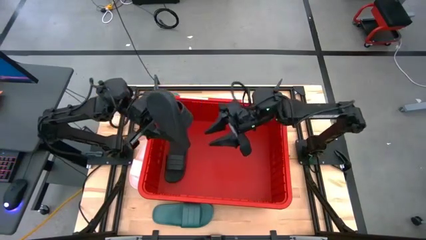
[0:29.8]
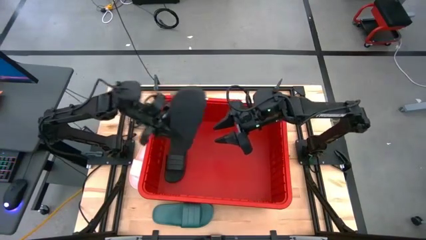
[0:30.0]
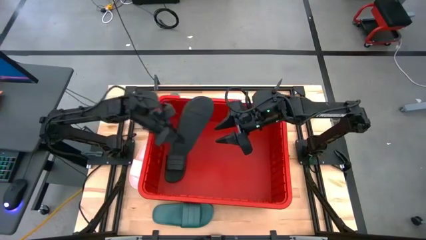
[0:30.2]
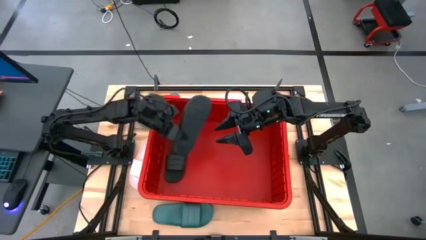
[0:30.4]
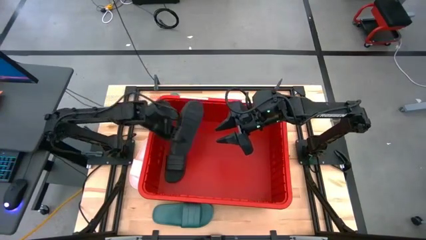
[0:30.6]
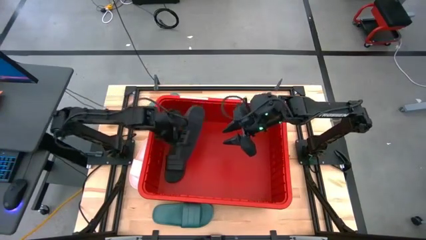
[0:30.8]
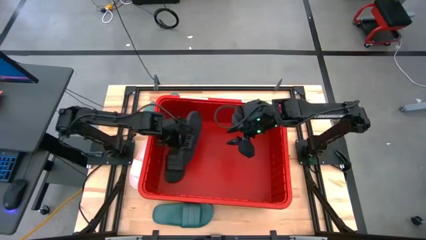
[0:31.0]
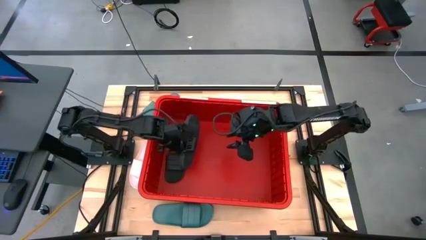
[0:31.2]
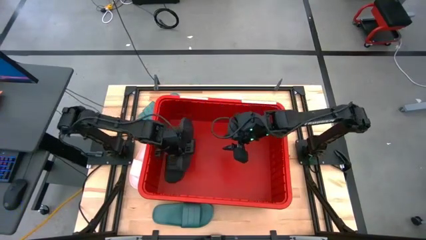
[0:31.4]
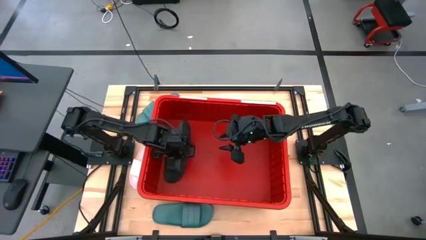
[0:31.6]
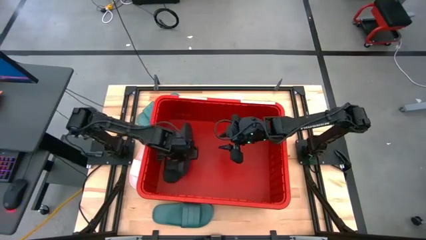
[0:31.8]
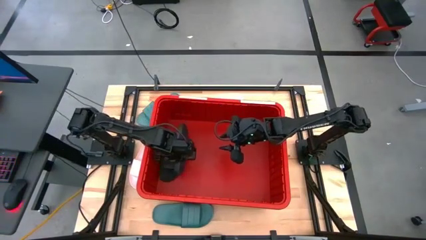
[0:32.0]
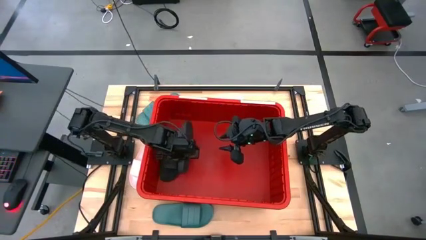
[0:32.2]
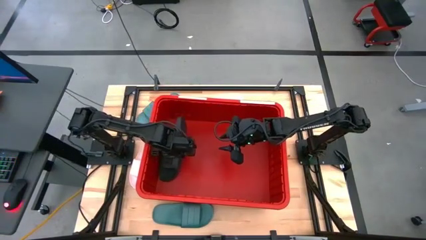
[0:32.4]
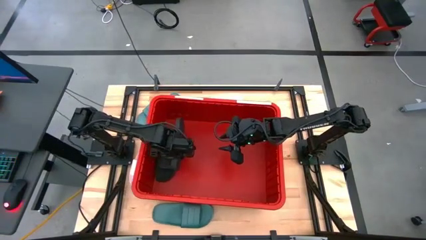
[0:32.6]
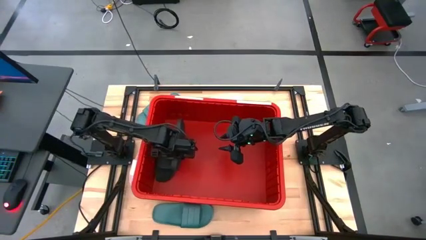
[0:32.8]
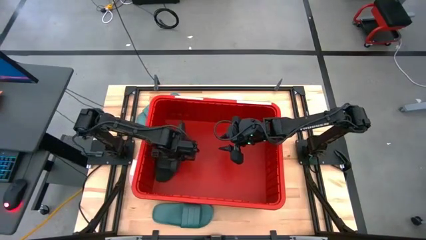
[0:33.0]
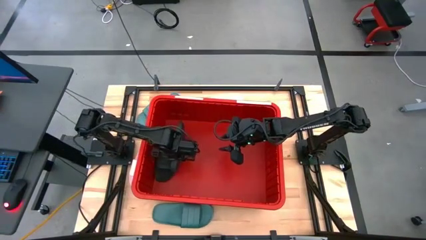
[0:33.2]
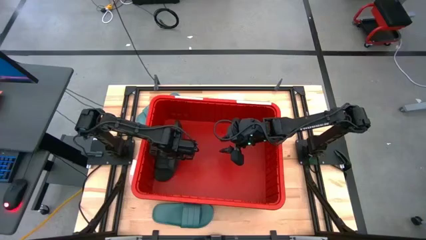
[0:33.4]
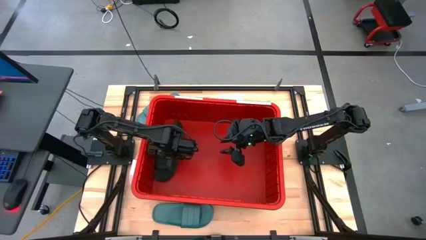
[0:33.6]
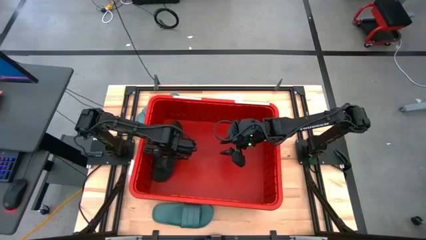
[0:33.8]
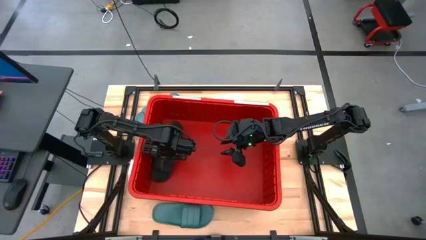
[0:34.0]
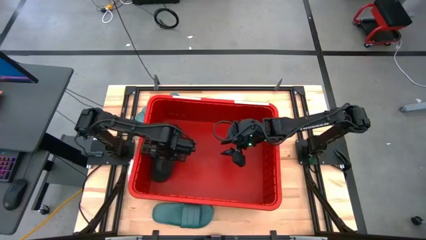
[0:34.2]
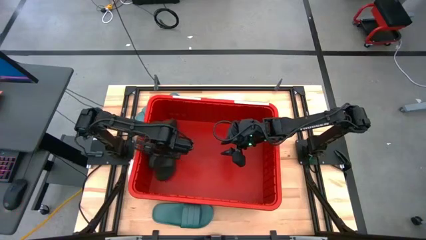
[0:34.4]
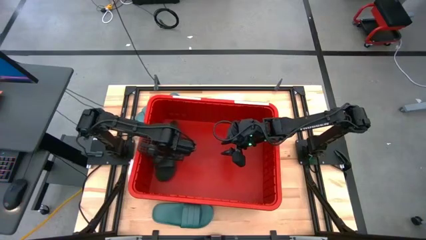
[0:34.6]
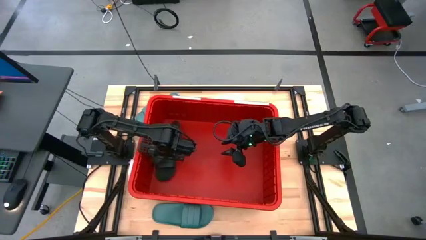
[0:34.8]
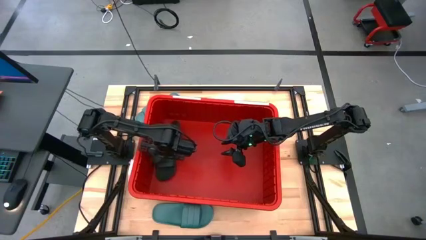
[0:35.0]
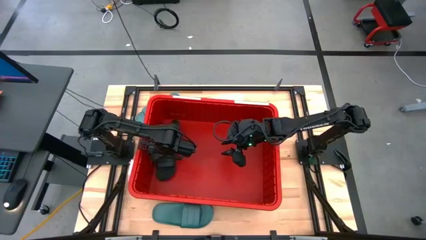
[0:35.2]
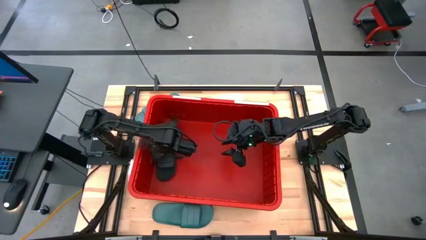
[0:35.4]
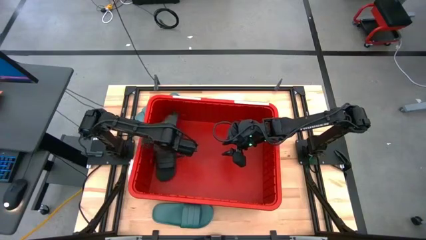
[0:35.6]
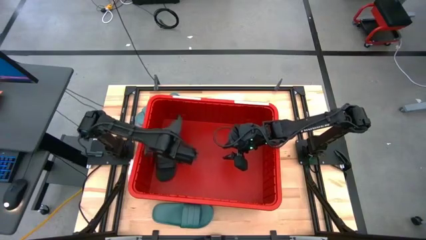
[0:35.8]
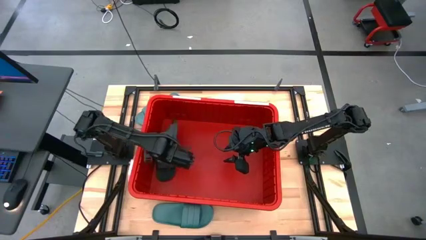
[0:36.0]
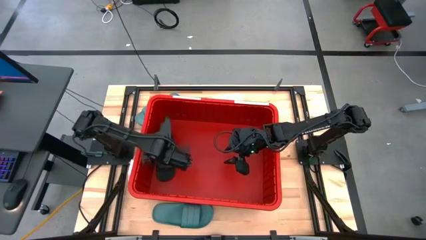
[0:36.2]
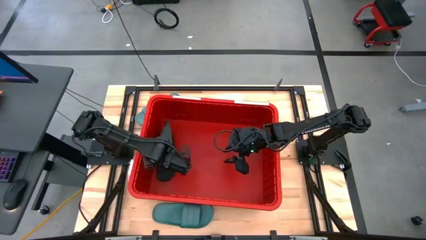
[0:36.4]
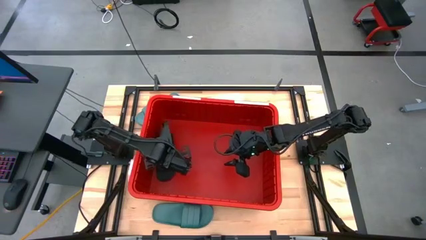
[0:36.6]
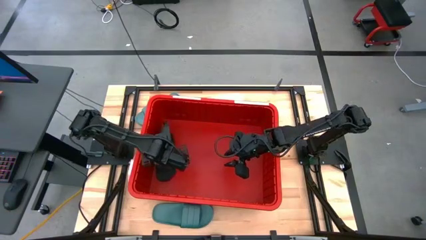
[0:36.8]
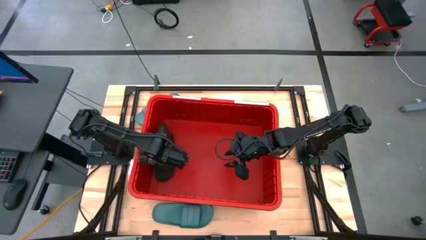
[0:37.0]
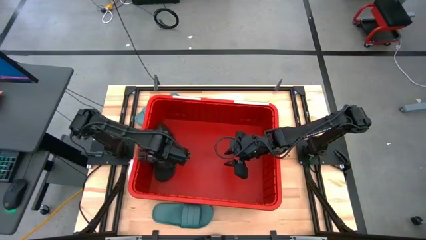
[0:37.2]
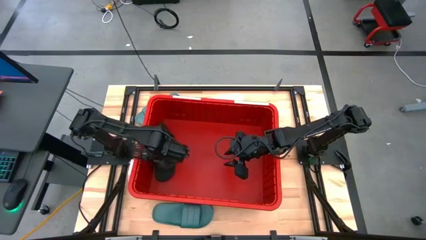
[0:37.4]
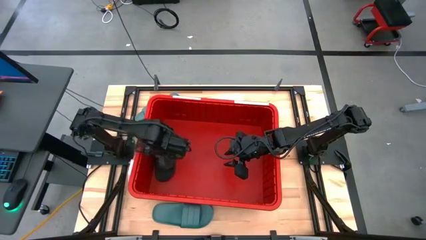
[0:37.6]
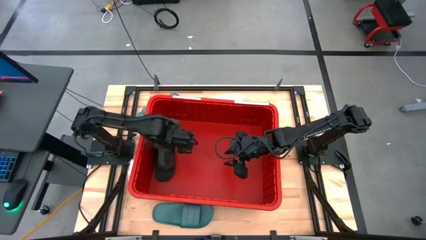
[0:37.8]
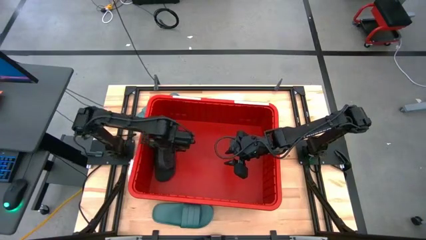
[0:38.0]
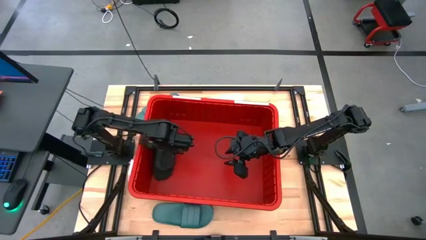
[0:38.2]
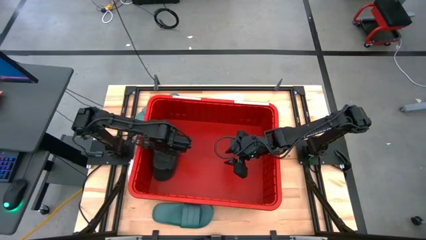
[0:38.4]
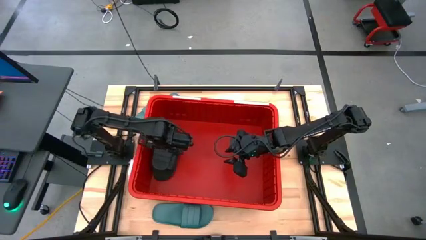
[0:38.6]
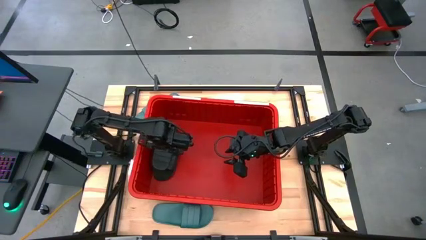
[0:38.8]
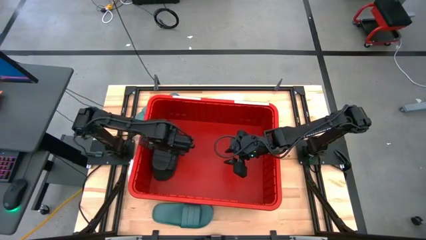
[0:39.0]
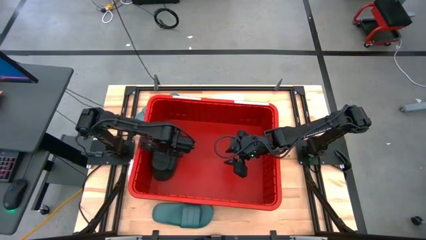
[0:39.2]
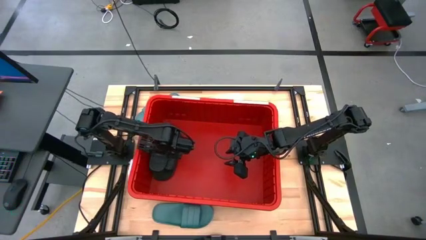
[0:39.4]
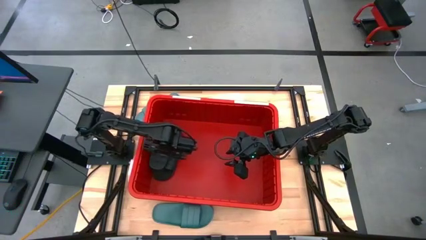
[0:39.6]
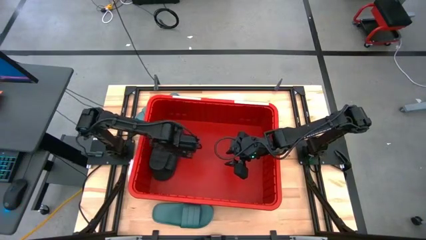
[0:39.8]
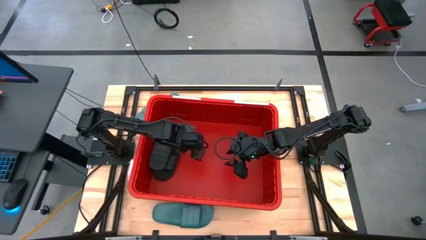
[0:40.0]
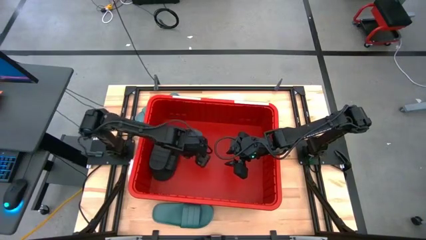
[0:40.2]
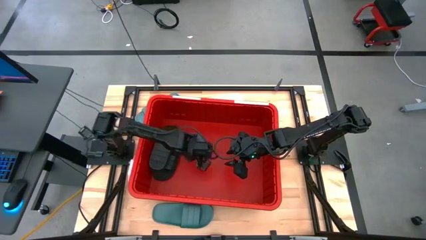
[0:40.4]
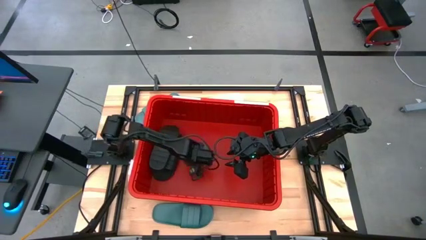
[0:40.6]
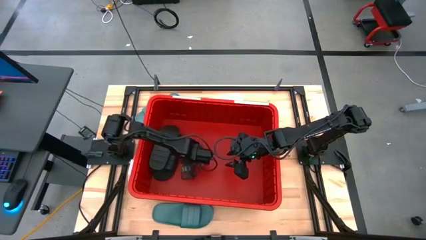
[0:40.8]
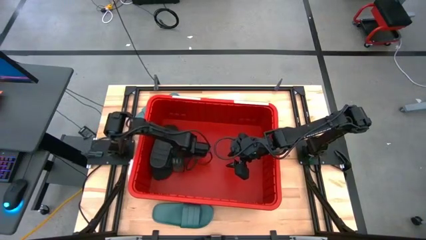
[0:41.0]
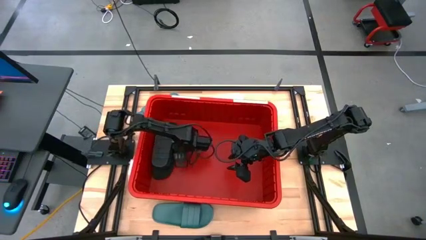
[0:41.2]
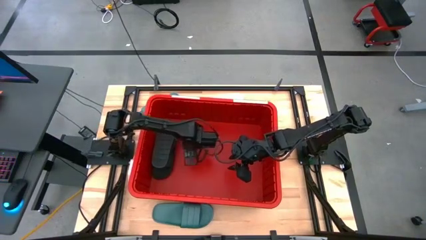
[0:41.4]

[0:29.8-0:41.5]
Task: Pick and place slides into bin
Put the black slide on top of the other black slide in the container
